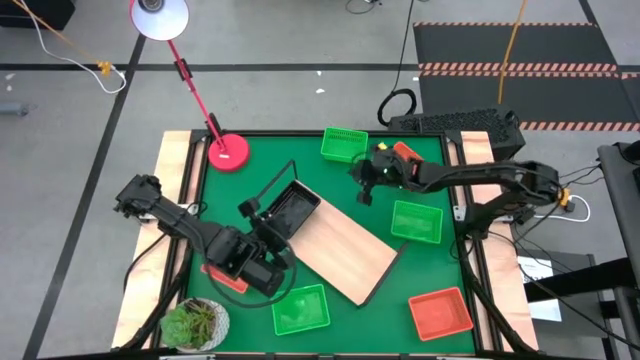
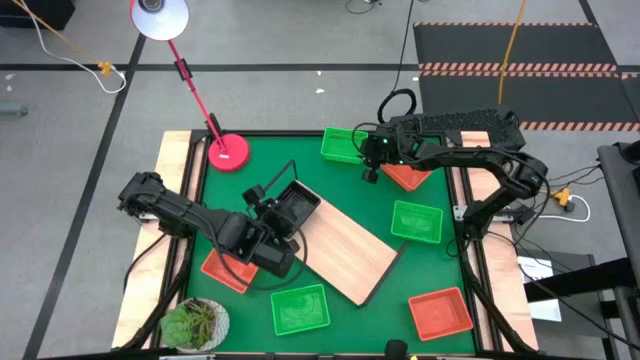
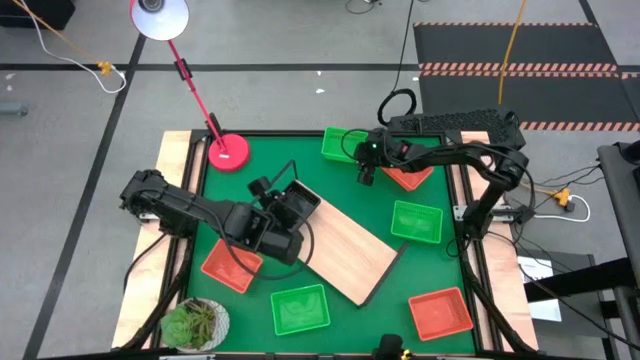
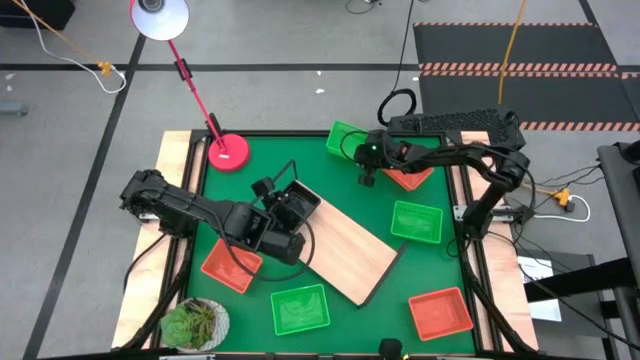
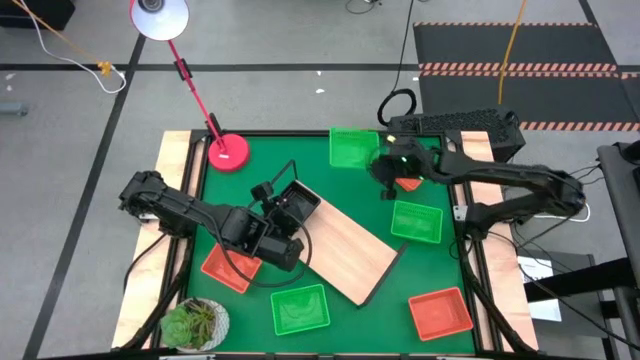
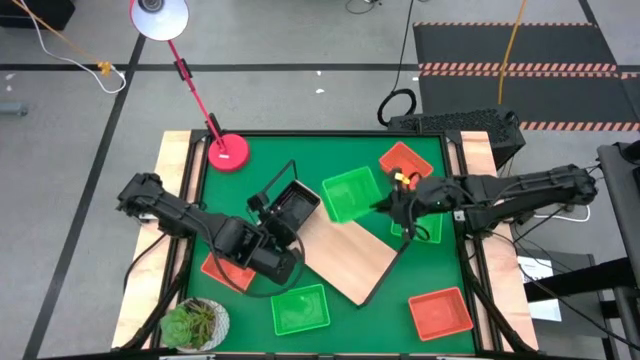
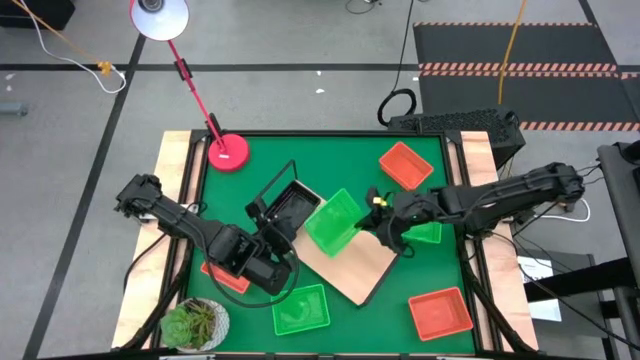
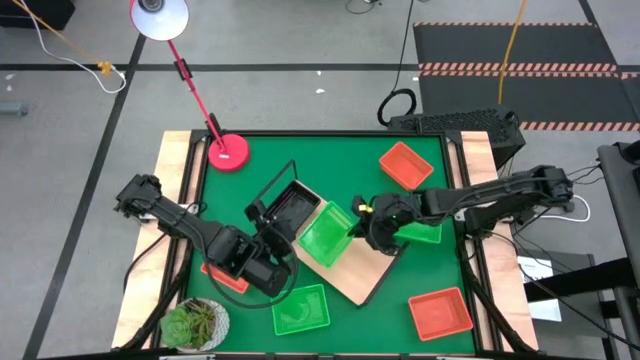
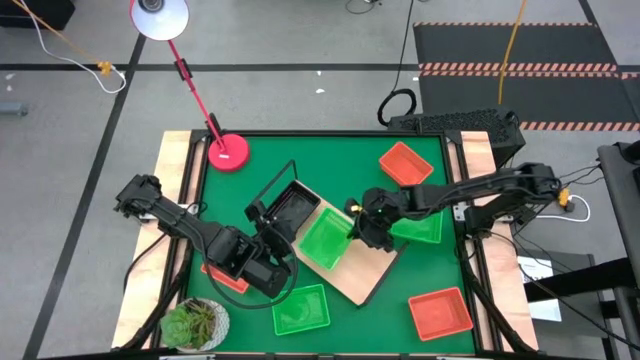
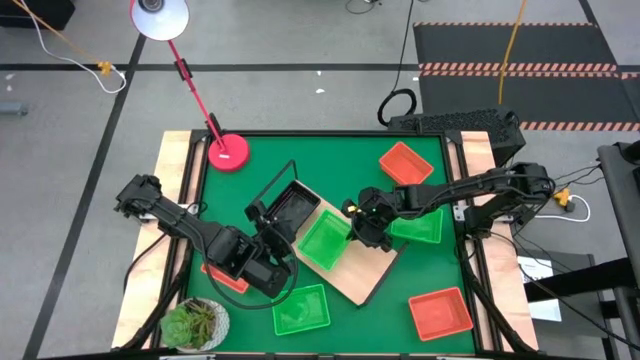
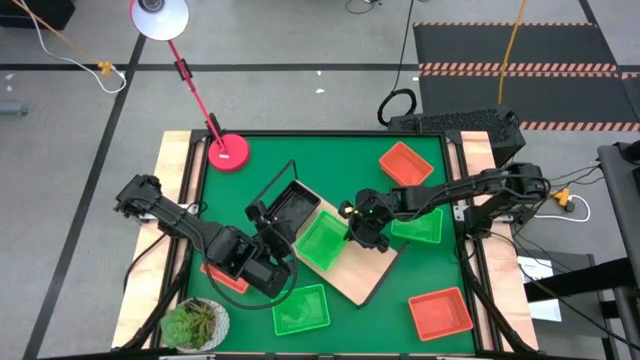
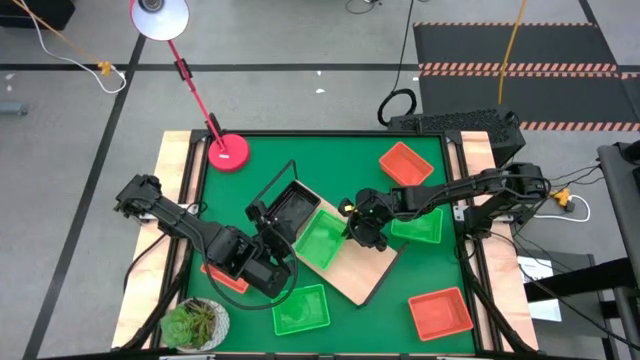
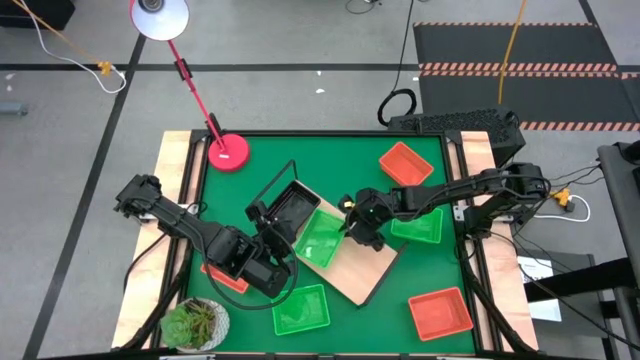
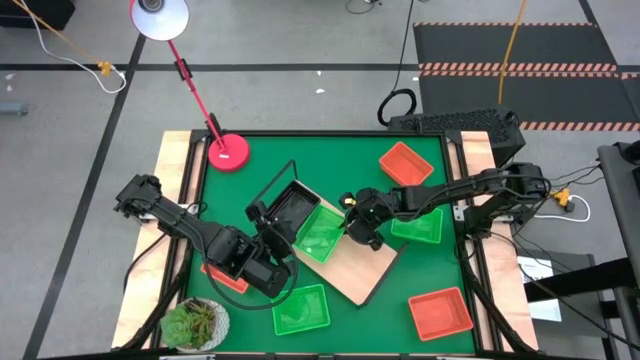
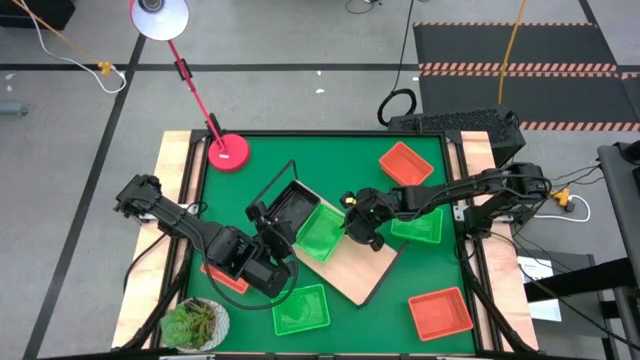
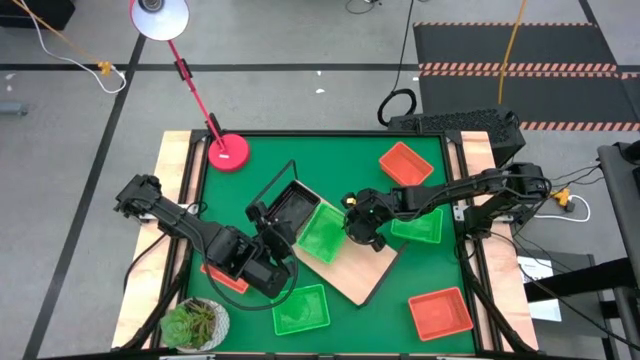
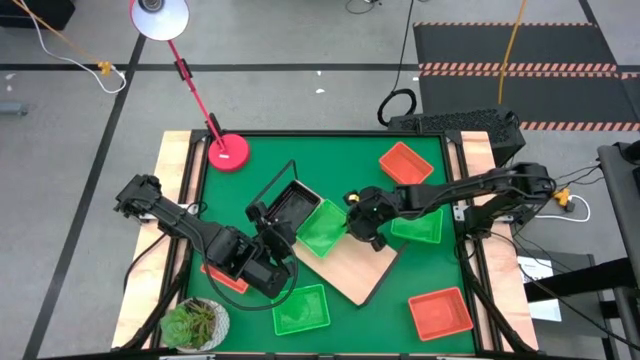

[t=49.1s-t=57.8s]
Task: Stack baskets on shelf by color
Put the top green bin on the shelf

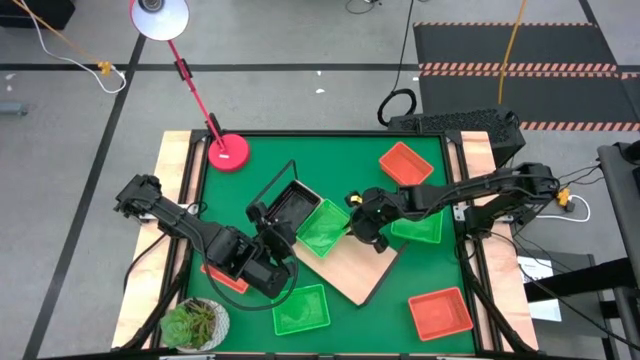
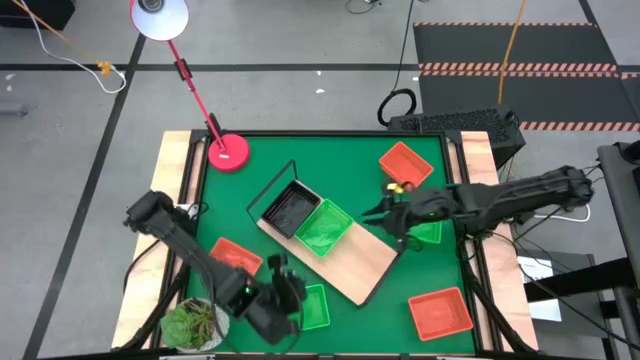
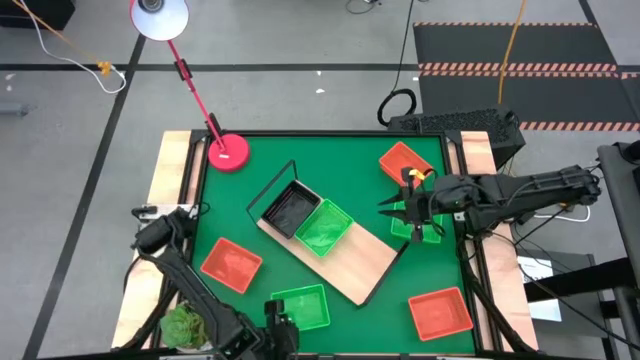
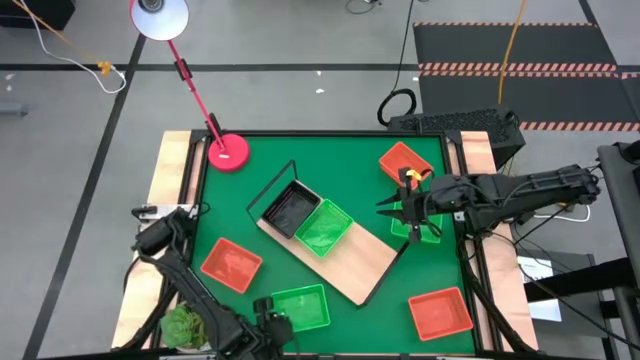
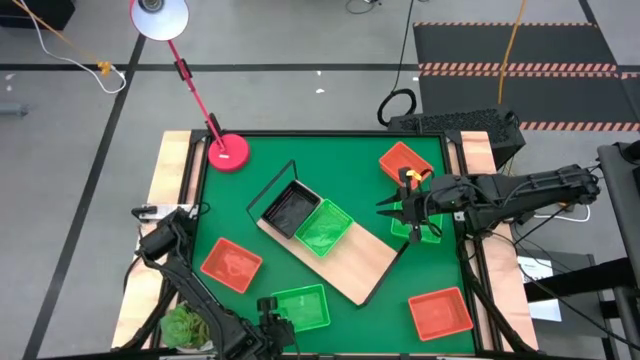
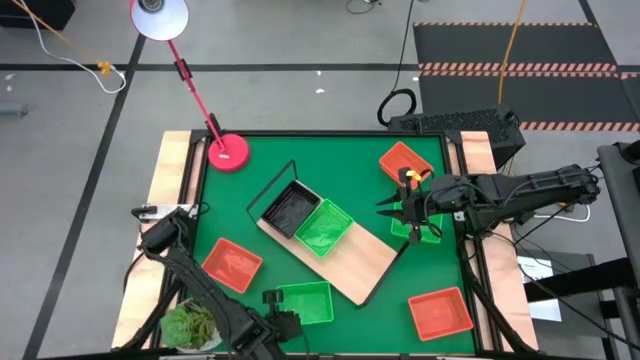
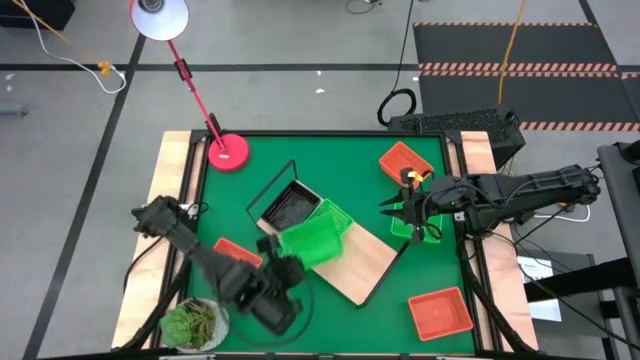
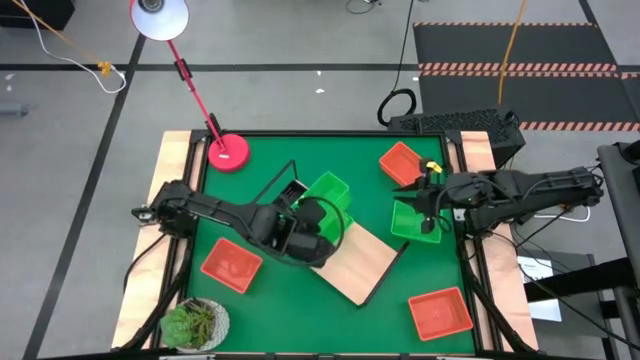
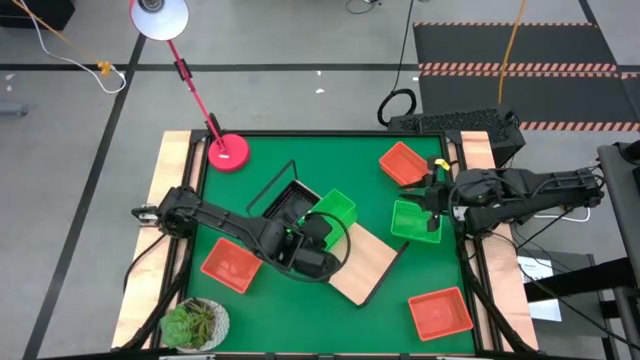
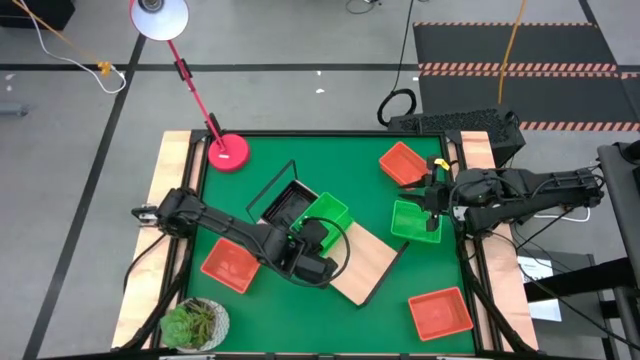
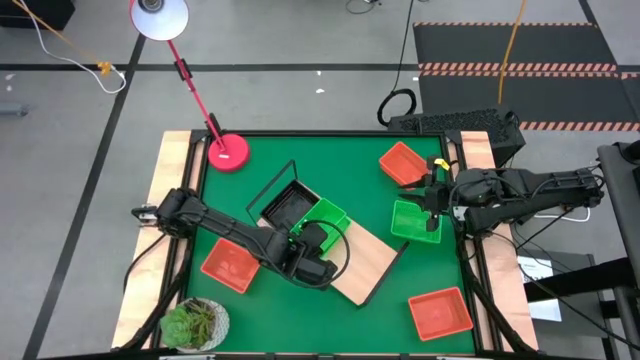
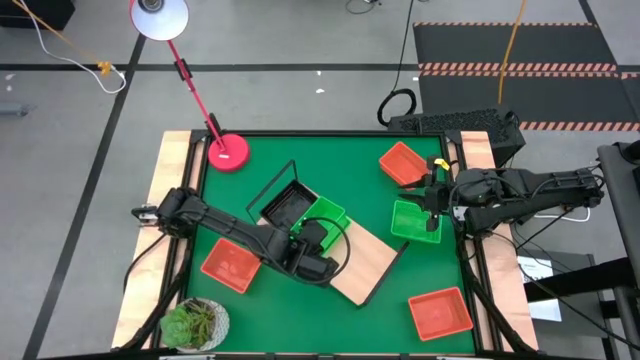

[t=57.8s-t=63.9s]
Stack the bottom green bin on the green bin on the shelf

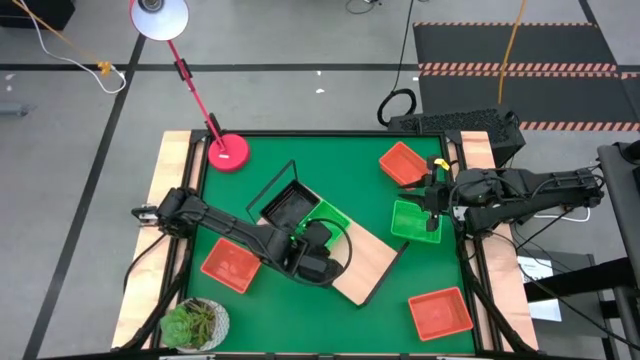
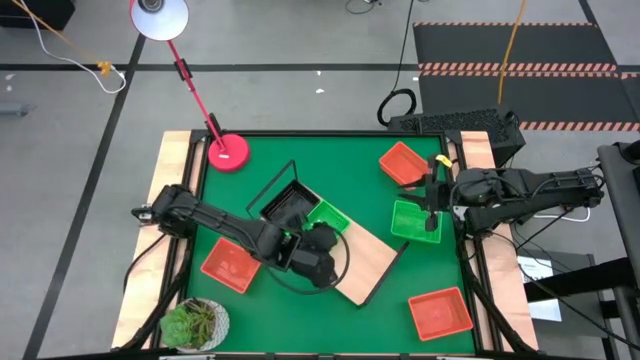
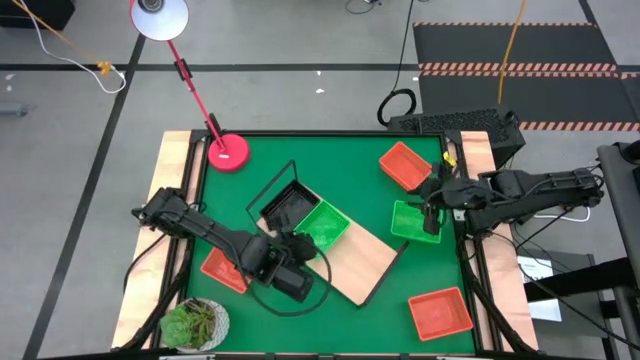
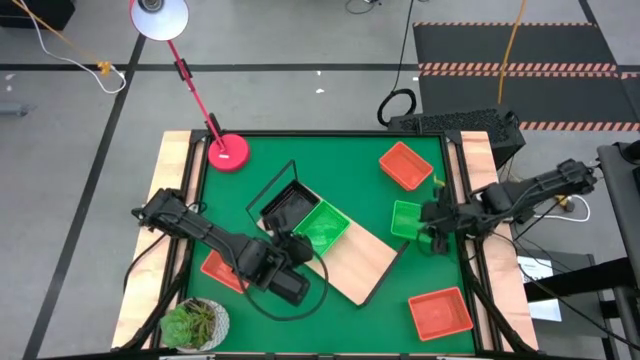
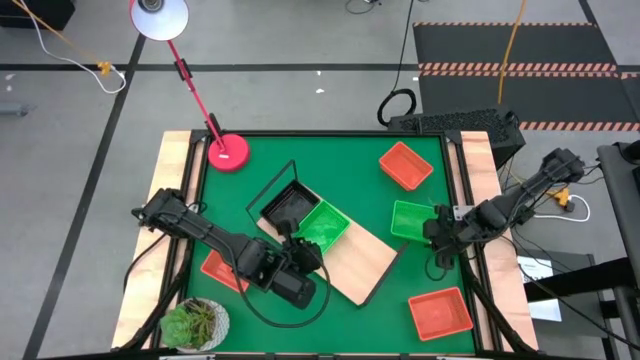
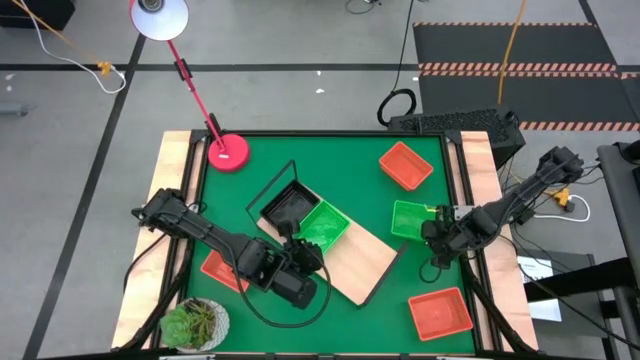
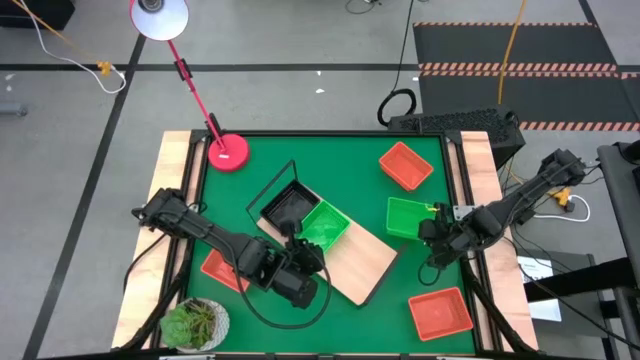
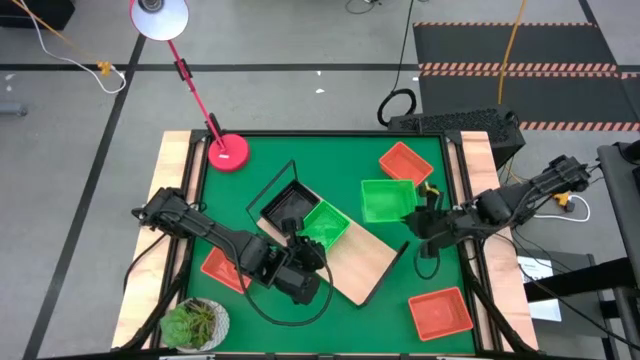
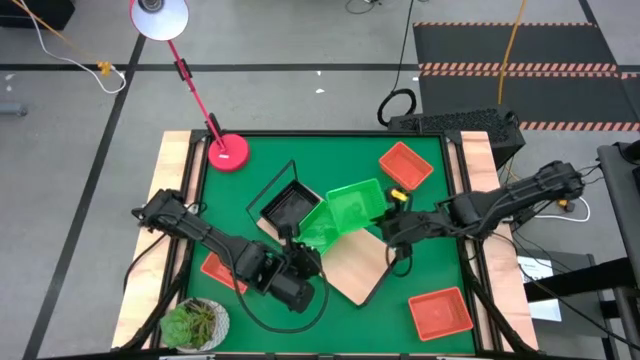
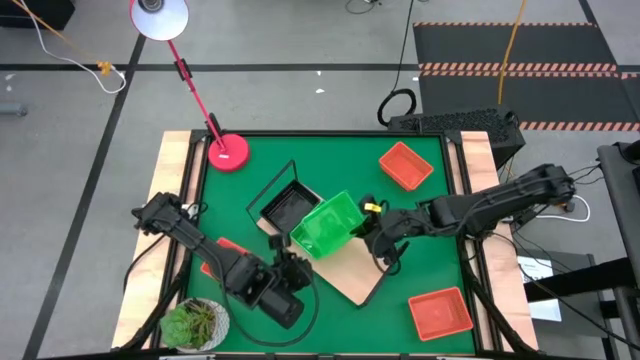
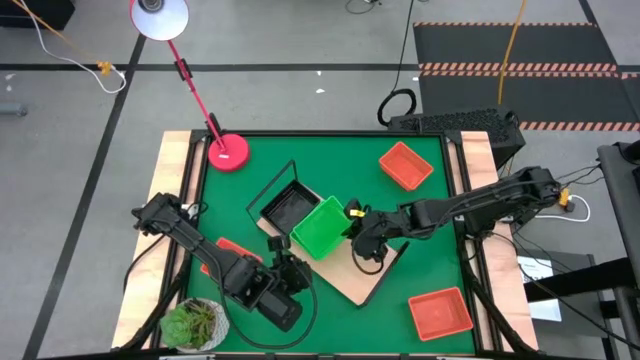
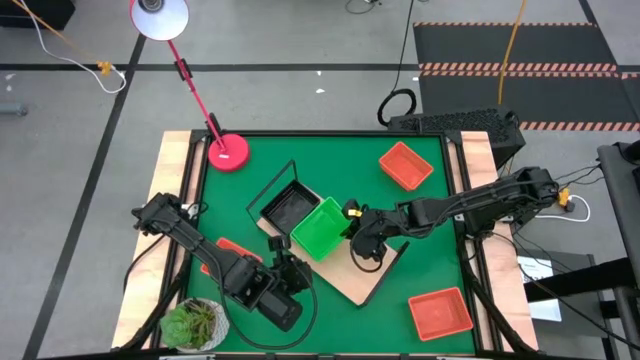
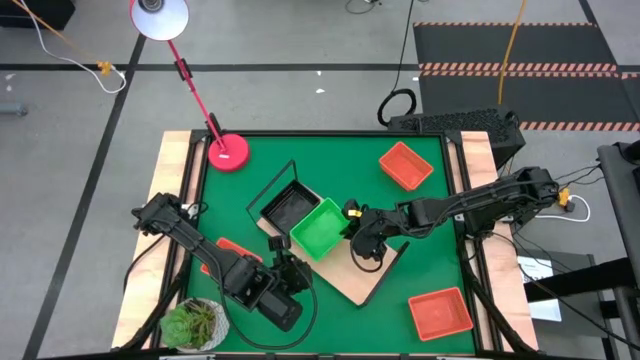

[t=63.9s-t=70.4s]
Stack the green bin on the green bin on the shelf

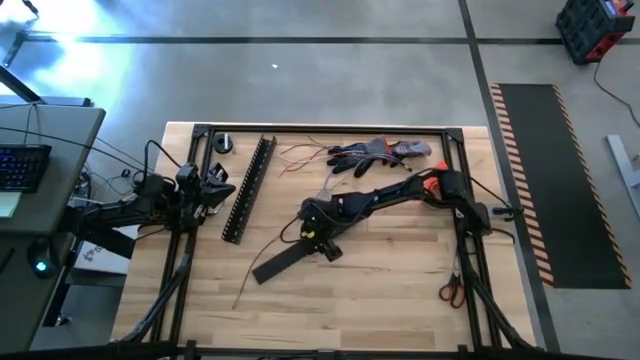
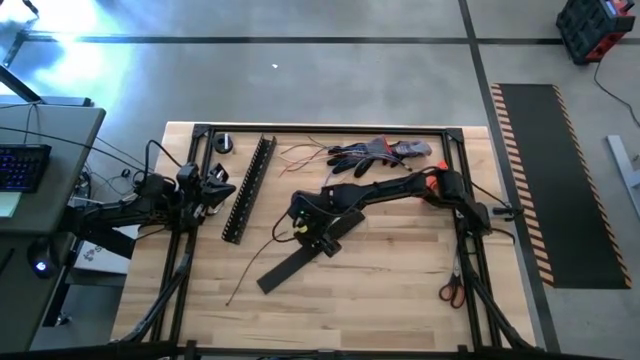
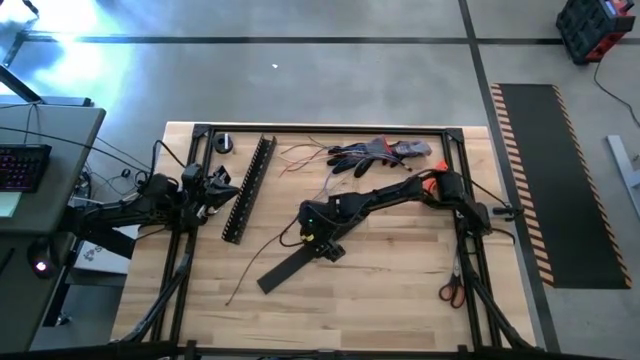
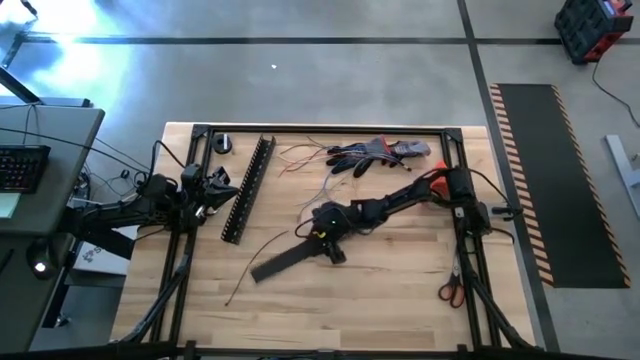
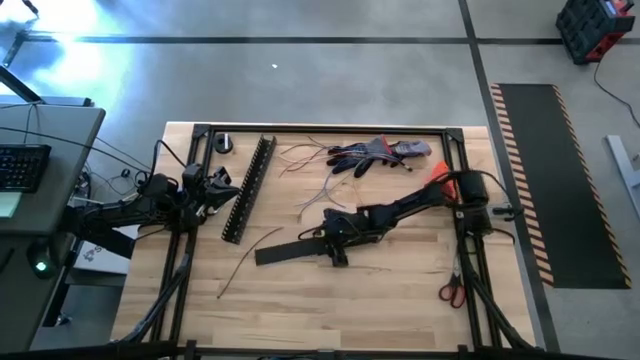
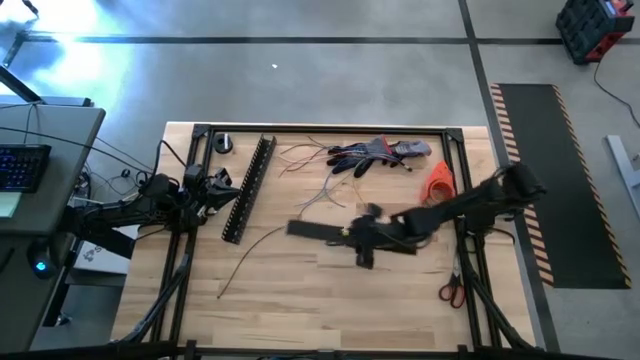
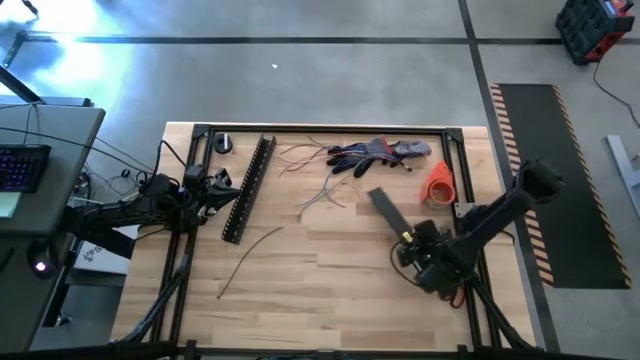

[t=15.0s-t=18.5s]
Task: Ziptie cables
Put the black cable duct cover into the middle right of the table
